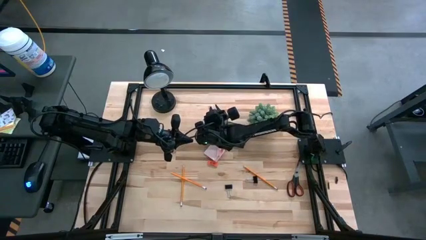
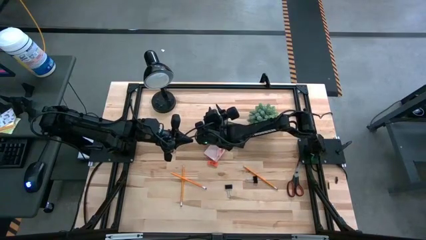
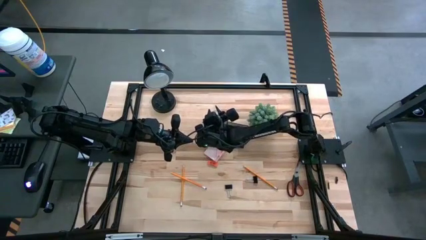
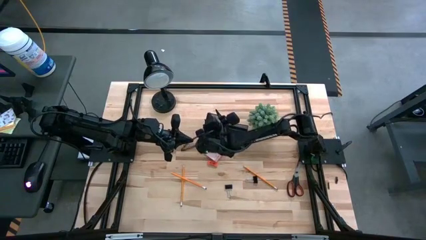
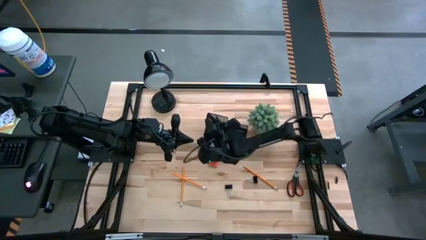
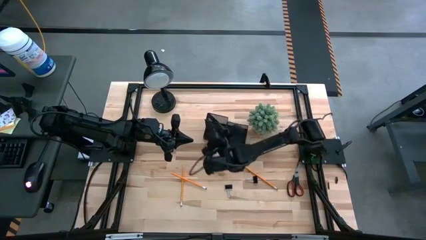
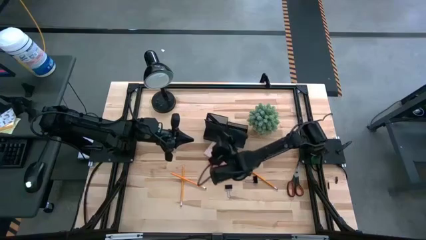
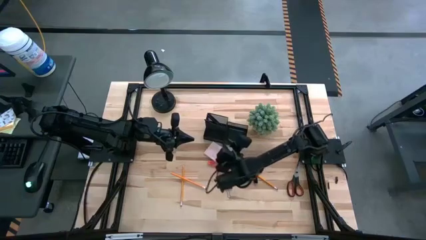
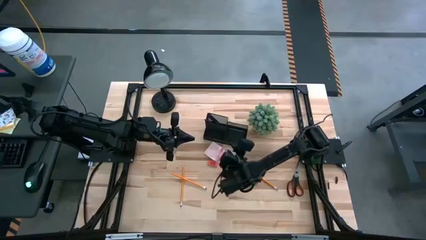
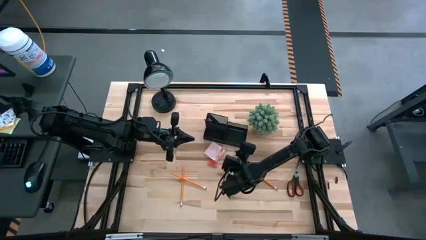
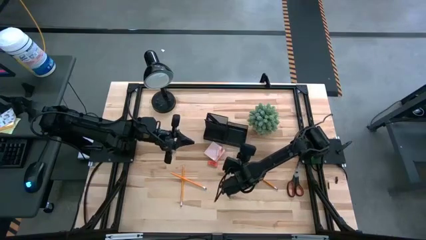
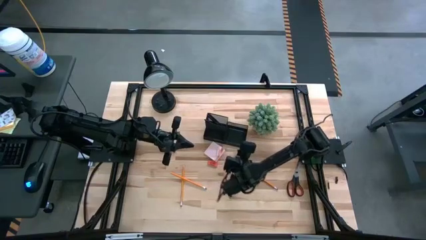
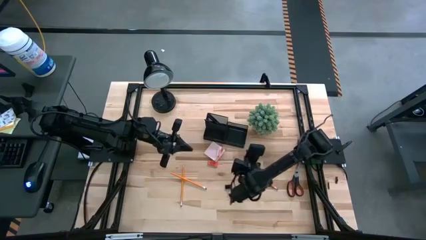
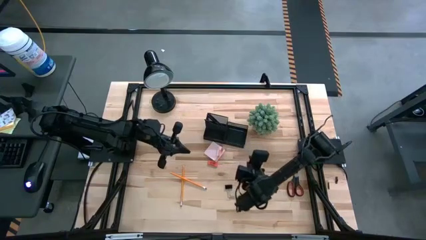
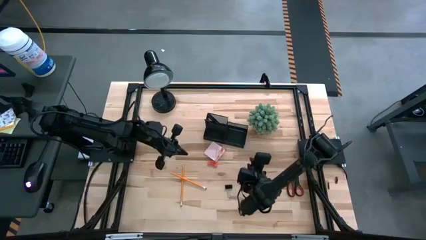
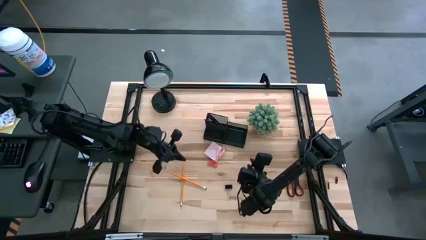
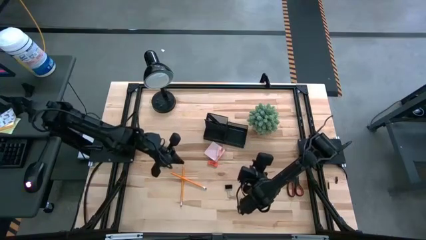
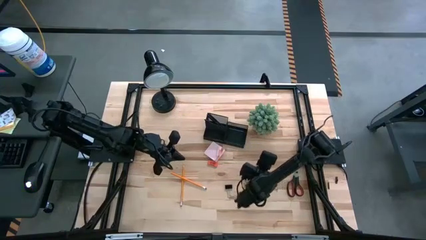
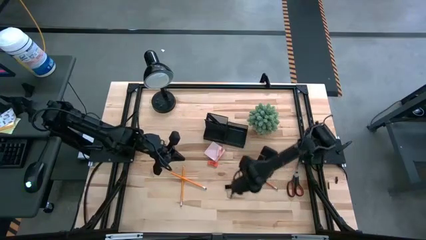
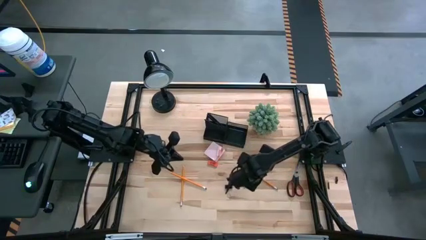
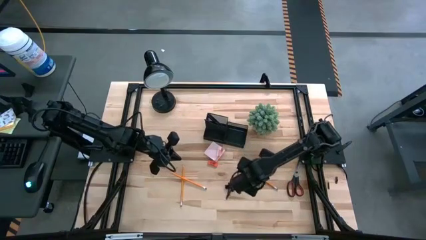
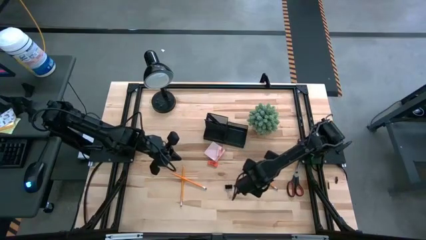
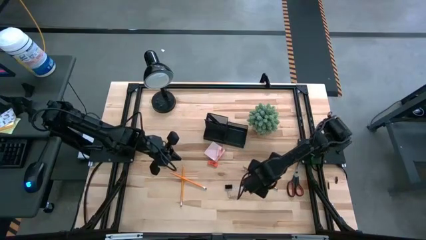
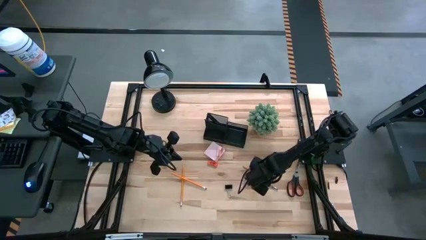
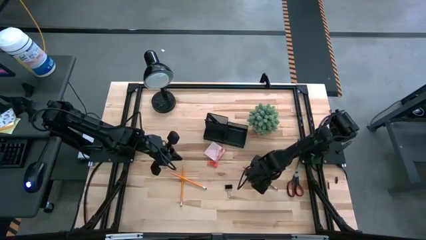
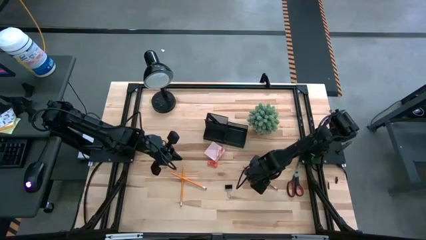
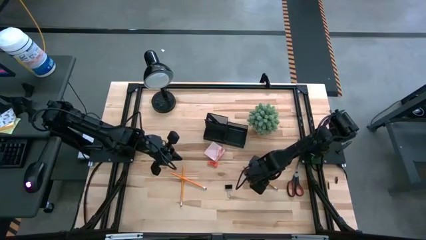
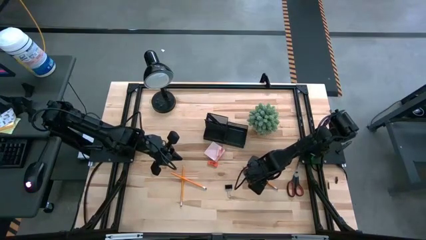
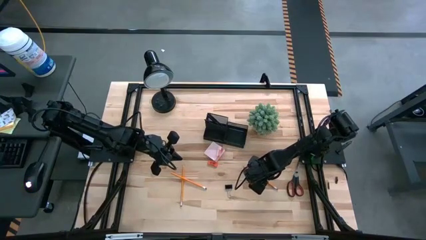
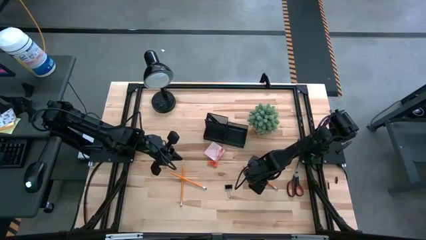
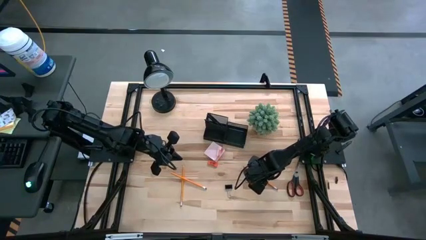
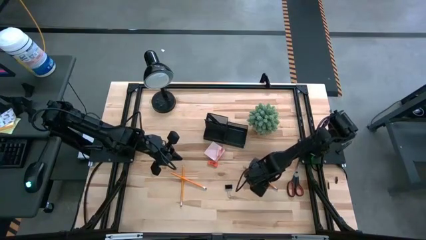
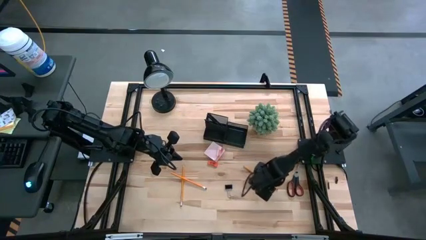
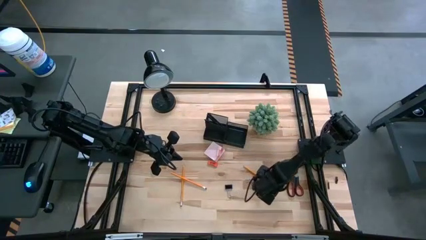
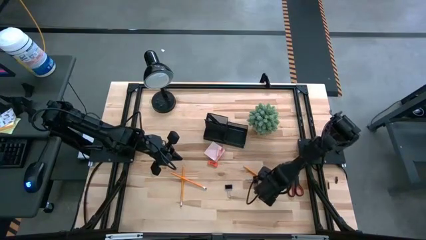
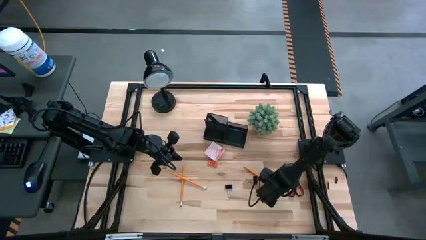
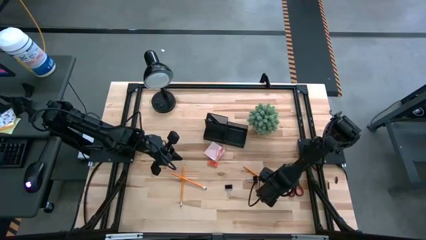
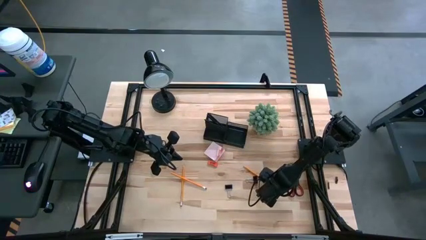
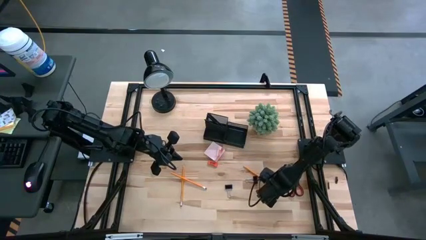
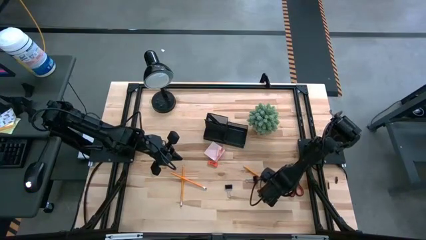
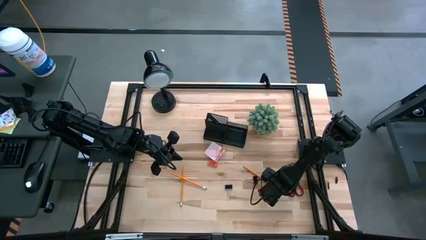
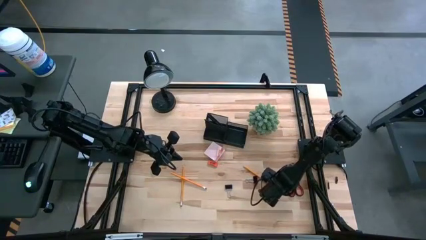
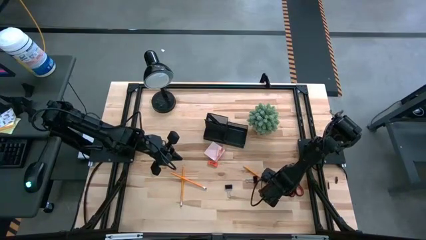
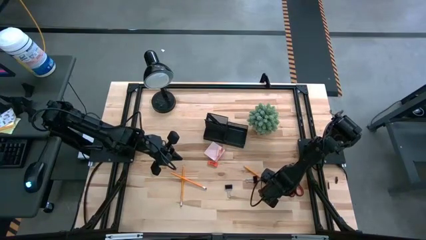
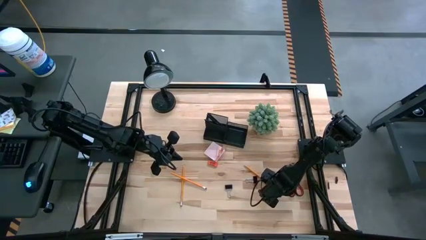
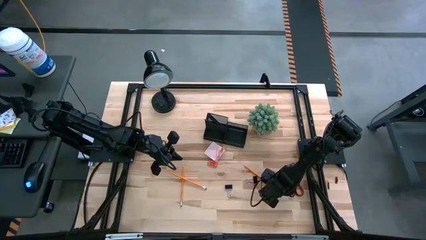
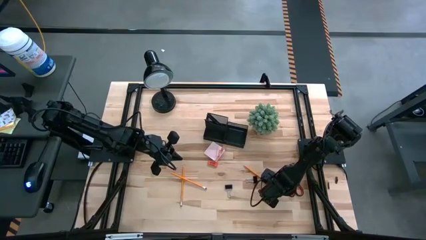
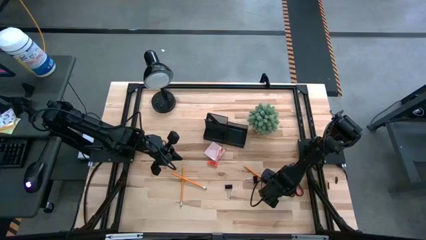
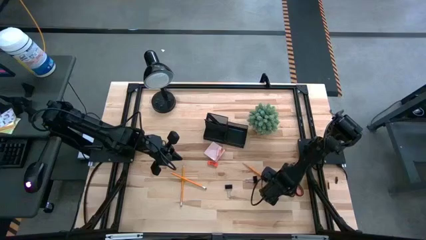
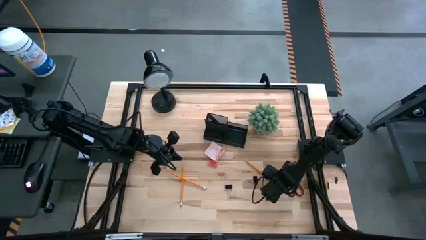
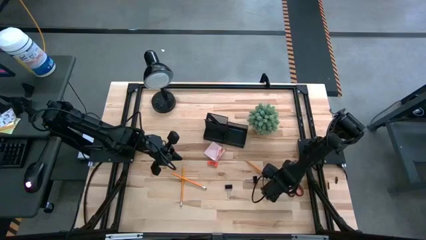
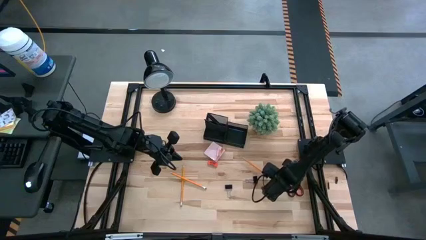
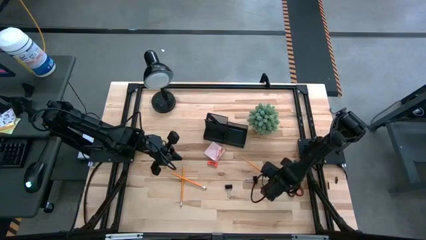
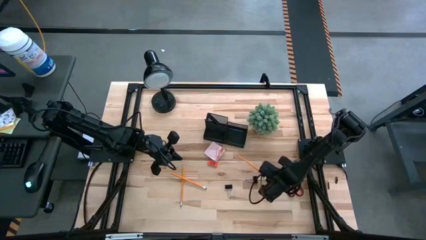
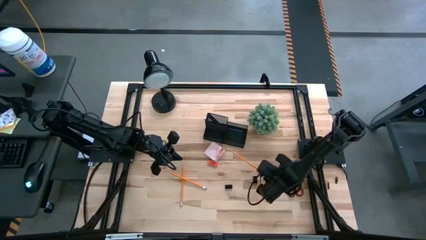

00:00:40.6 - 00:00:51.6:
Task: Pick and place office supplies into organizer
Put the right orange pencil into the black desk organizer
